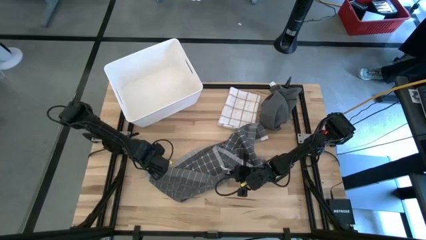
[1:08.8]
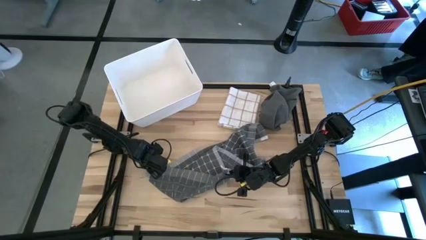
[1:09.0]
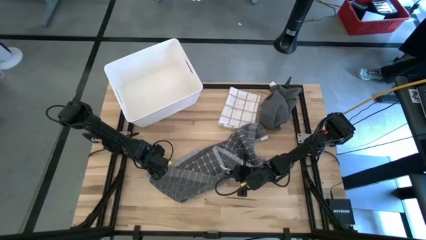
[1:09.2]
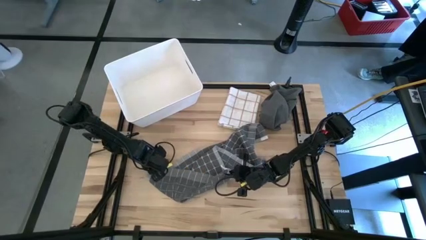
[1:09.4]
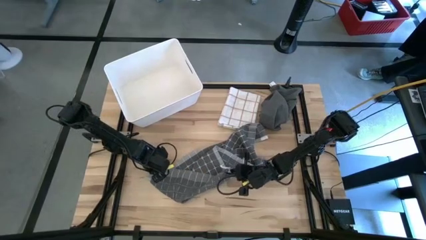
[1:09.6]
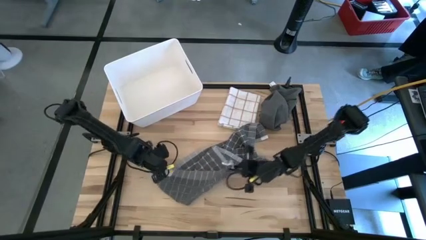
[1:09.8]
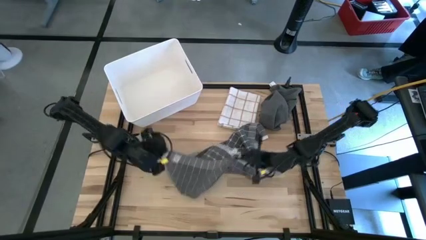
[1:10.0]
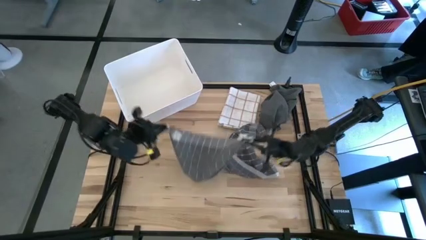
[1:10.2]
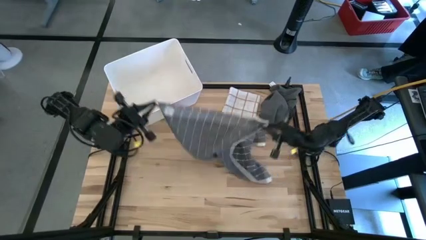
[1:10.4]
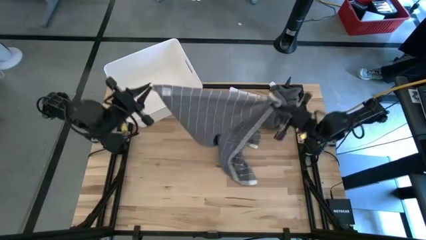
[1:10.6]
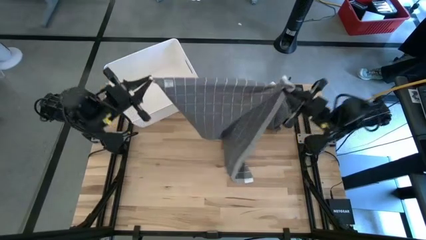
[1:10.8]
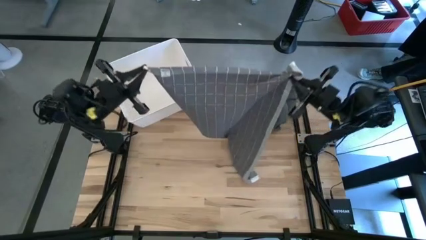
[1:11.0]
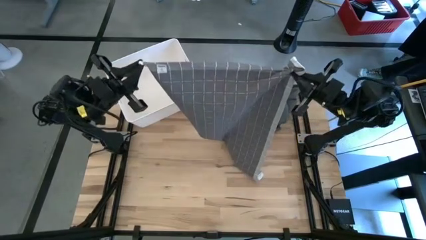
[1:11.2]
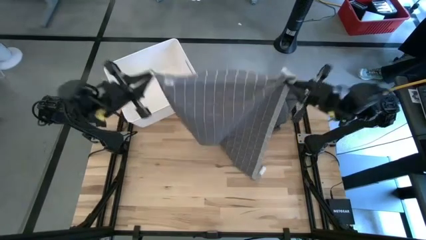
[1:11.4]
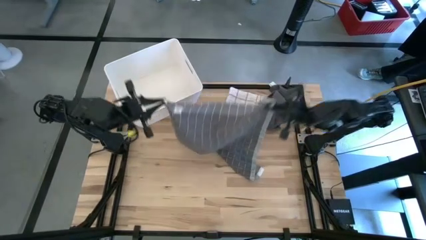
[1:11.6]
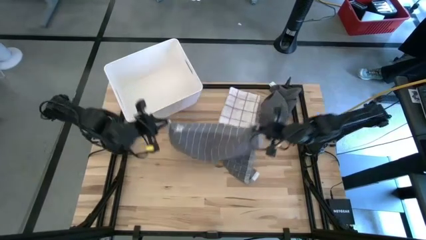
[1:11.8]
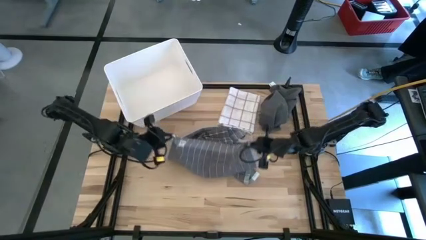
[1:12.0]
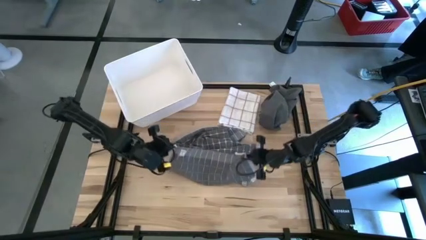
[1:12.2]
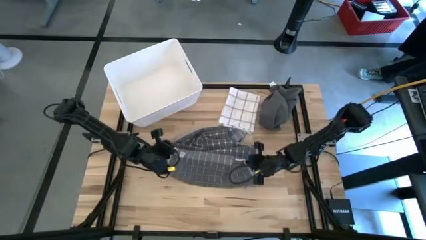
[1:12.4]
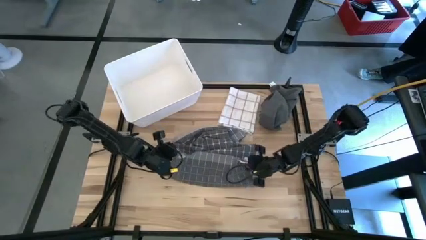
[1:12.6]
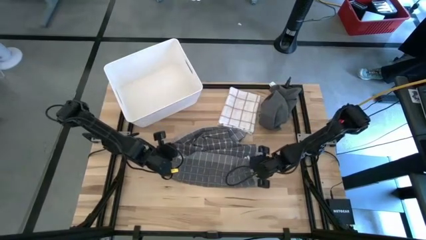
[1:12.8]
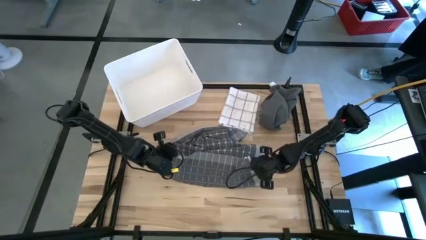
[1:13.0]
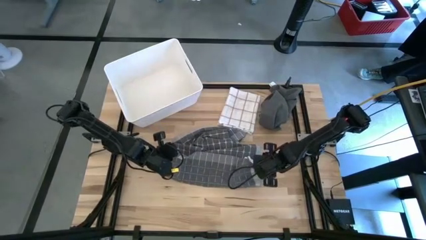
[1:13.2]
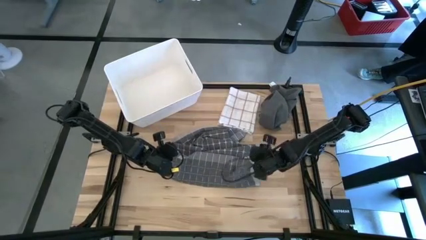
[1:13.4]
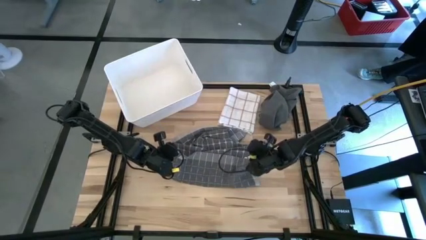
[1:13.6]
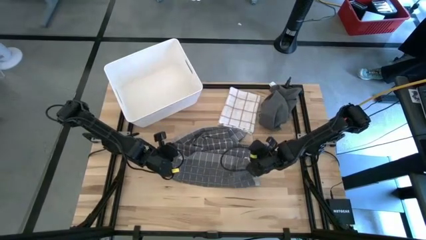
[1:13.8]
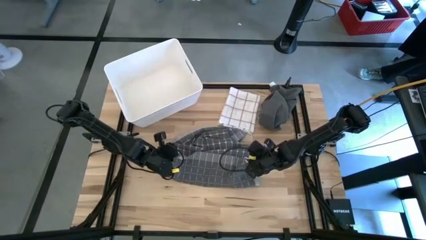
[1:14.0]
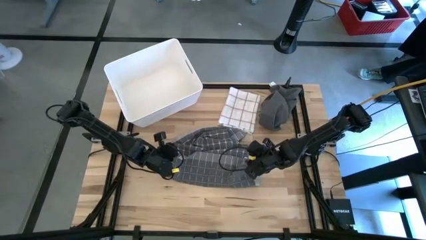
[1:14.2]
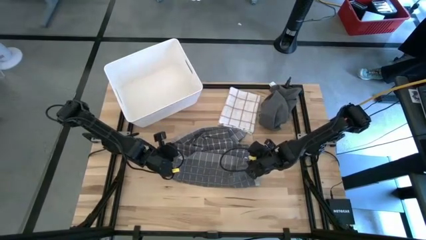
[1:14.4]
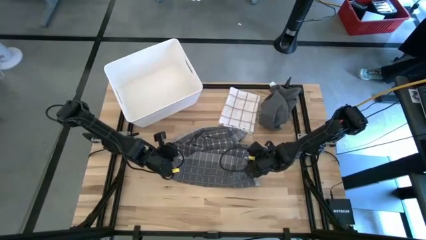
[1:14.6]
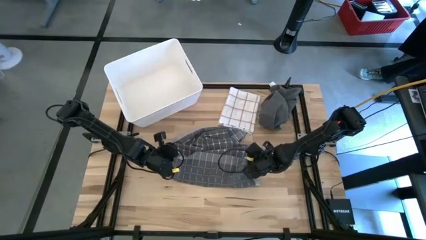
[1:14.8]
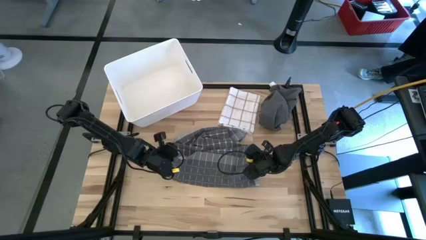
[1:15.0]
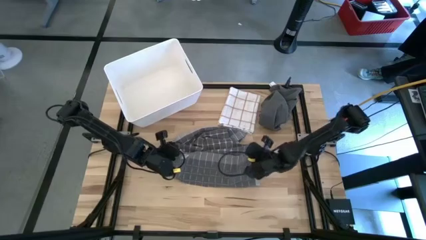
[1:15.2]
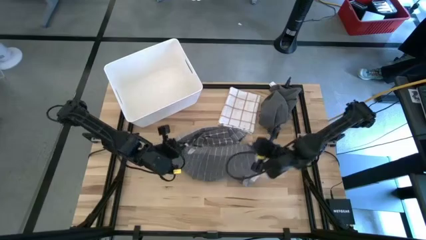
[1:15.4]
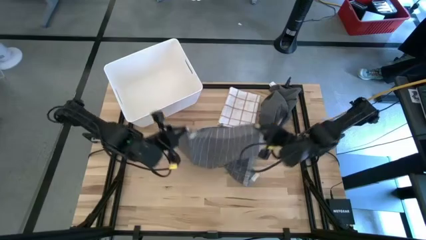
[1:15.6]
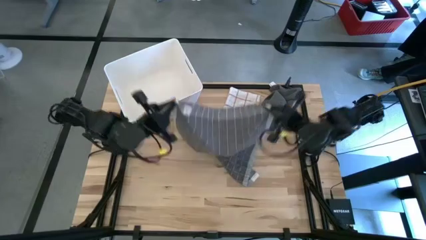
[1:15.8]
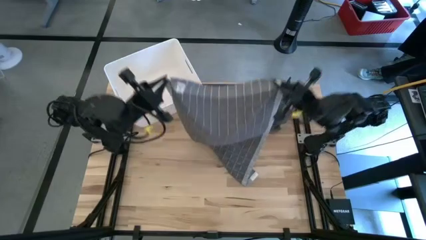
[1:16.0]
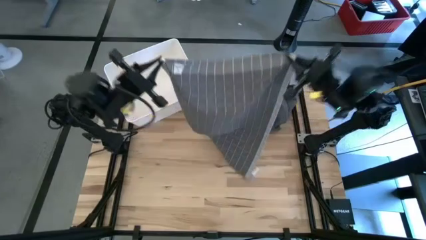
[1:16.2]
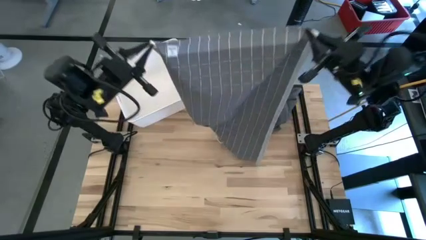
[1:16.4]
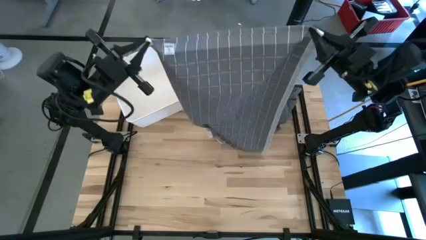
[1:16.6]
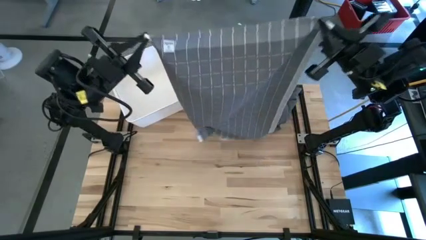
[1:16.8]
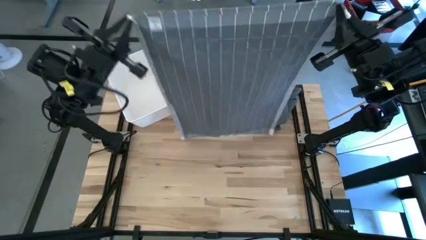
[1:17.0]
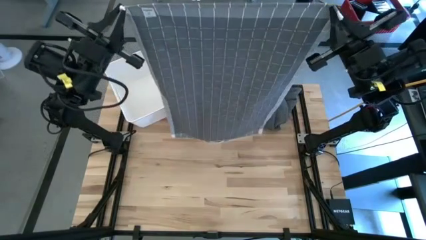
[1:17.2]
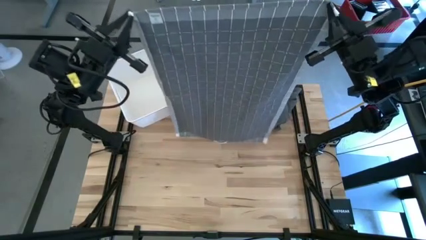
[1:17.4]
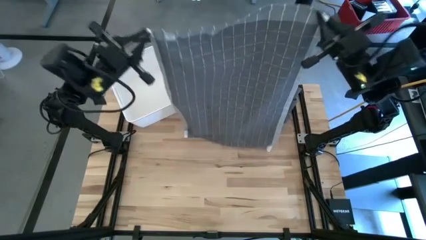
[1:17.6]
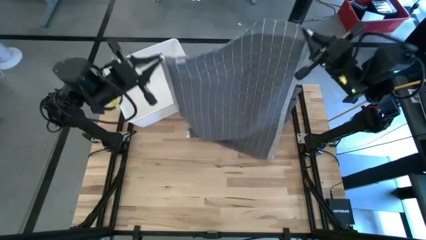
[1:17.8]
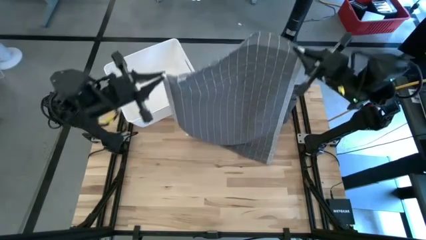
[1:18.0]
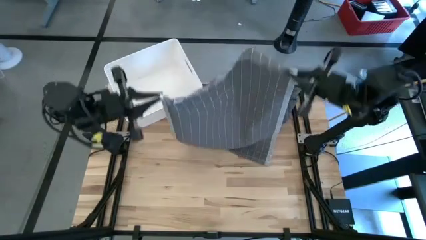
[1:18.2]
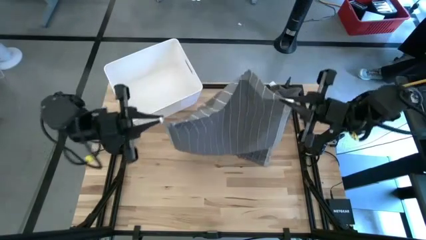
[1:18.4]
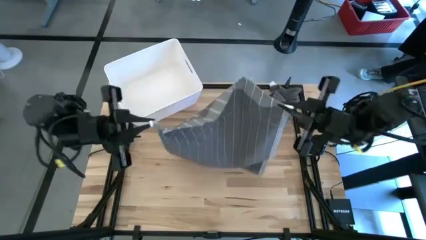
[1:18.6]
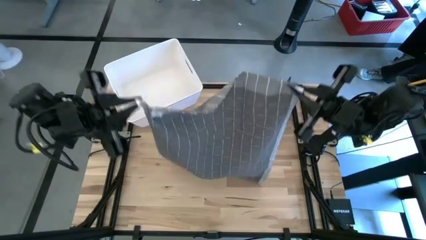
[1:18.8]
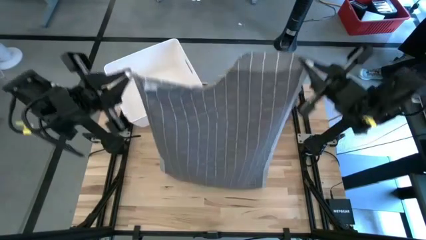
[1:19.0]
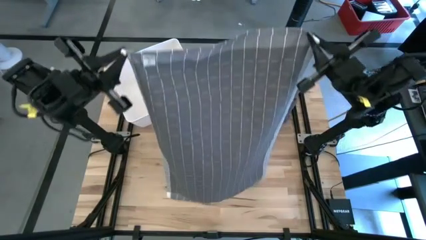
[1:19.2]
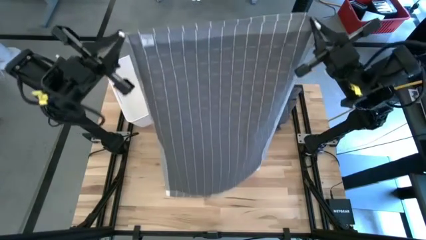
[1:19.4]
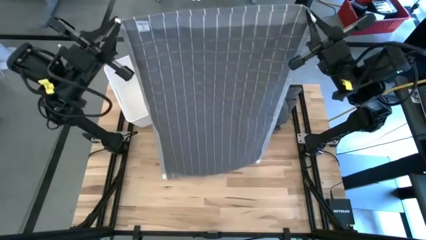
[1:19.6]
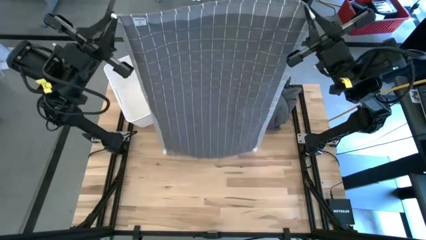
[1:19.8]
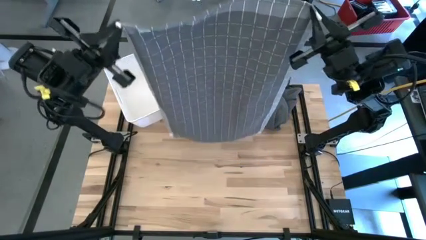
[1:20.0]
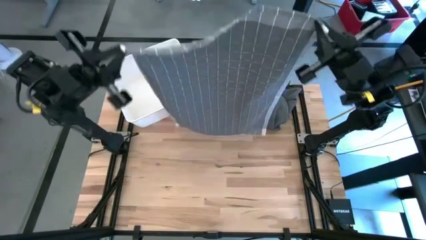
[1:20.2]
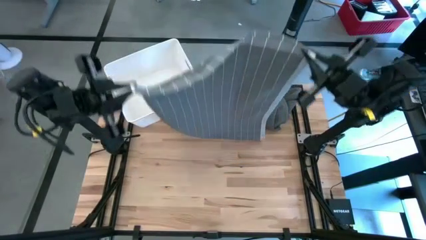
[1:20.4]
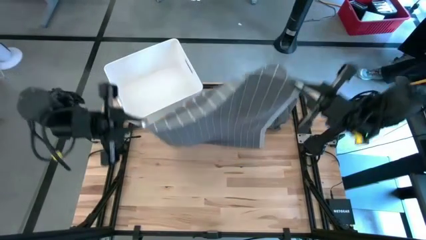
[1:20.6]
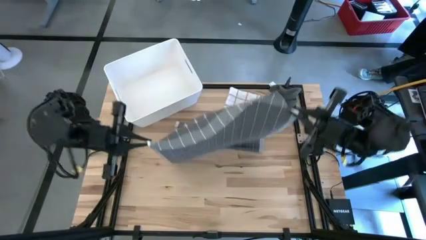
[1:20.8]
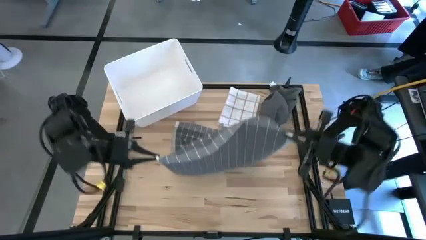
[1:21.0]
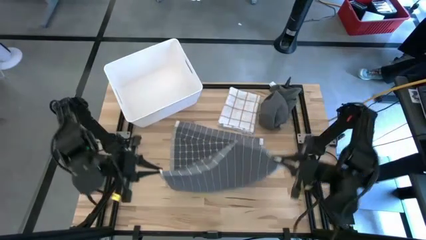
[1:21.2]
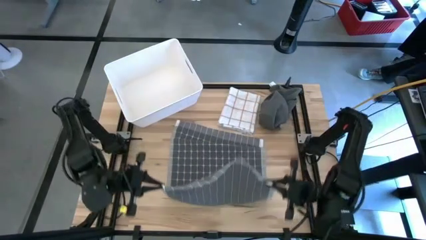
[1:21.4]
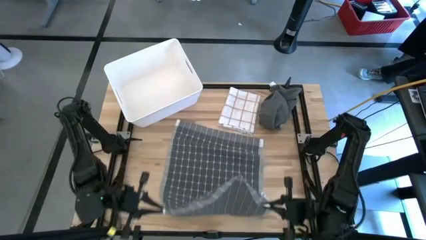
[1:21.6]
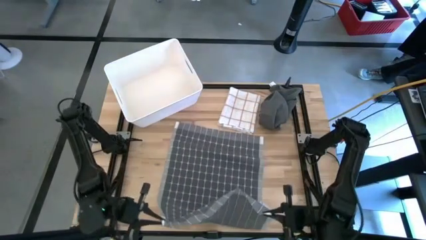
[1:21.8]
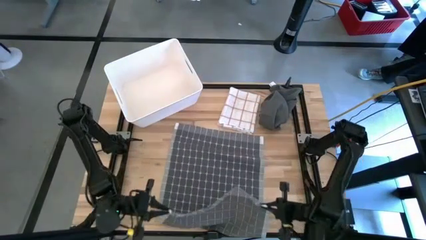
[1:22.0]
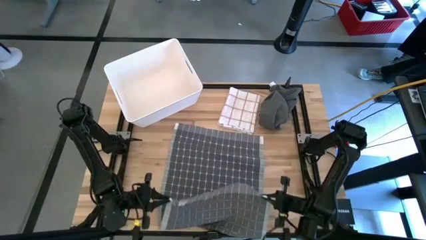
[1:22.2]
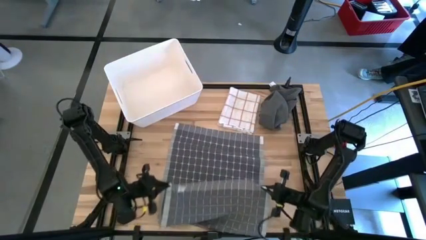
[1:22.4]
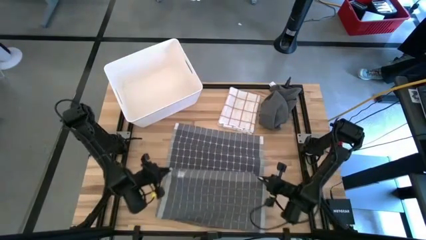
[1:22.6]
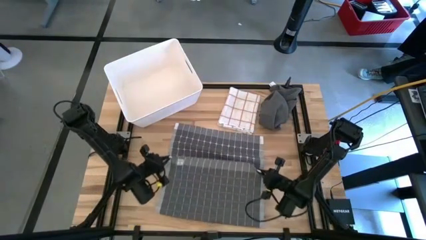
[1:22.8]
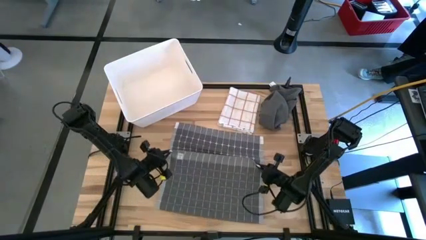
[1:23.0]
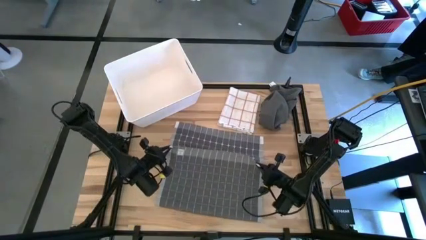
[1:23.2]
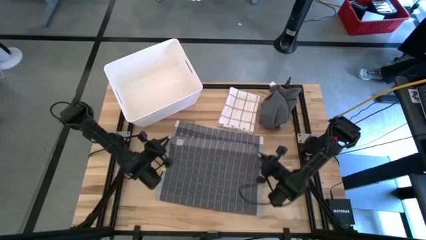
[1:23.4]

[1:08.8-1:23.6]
Task: Fold towel
Fold the gray checkered towel

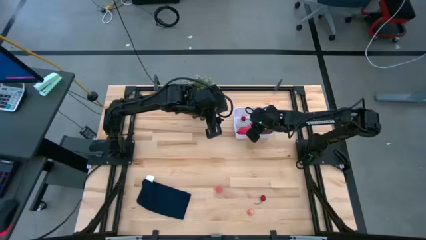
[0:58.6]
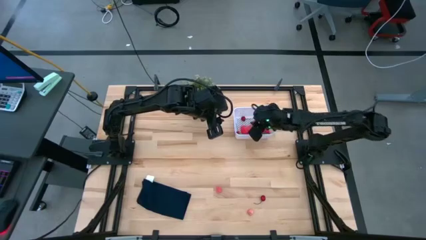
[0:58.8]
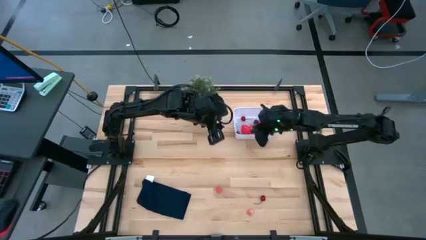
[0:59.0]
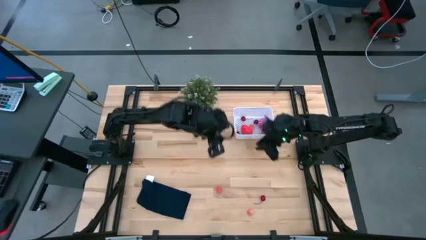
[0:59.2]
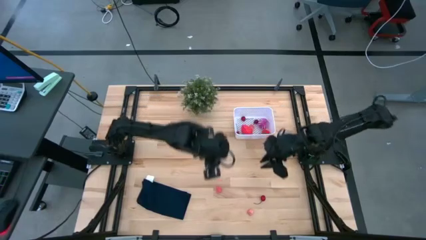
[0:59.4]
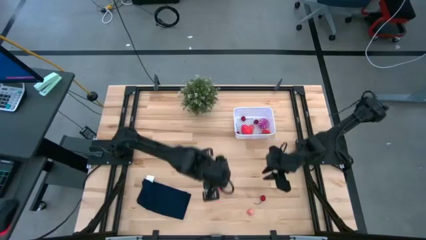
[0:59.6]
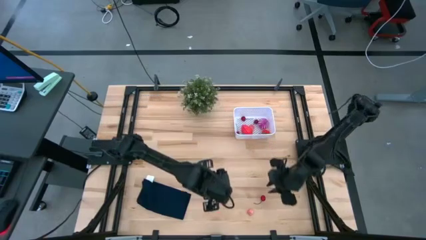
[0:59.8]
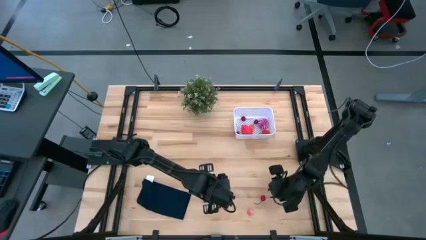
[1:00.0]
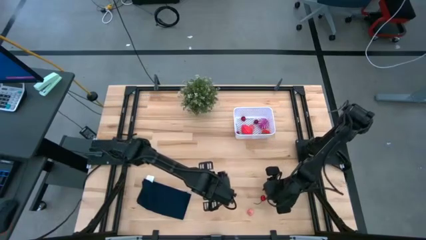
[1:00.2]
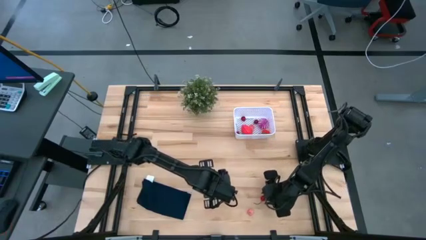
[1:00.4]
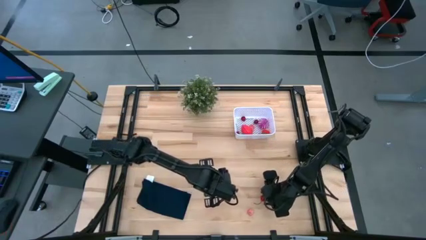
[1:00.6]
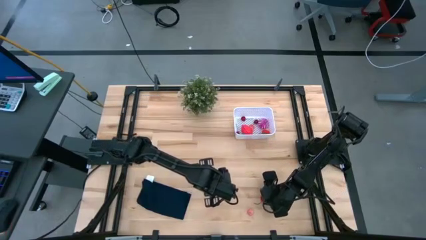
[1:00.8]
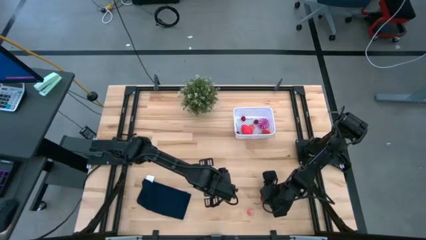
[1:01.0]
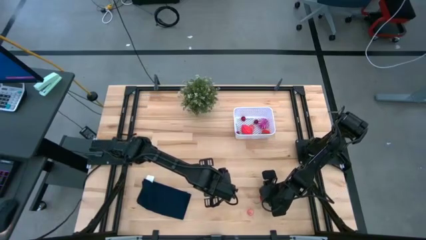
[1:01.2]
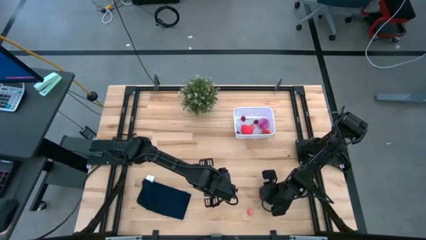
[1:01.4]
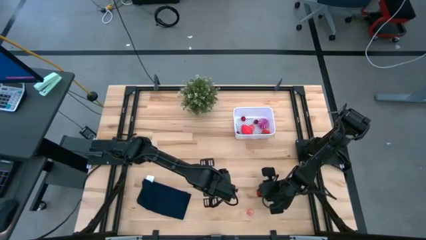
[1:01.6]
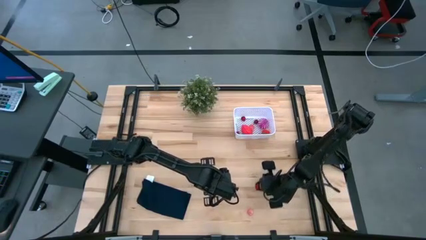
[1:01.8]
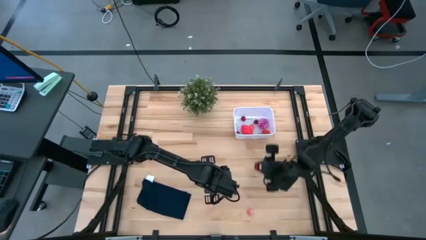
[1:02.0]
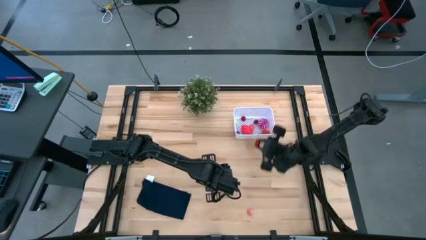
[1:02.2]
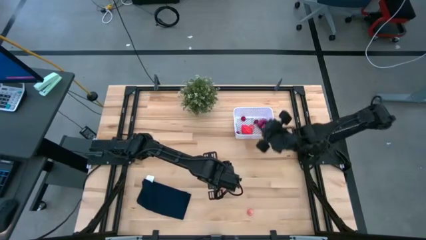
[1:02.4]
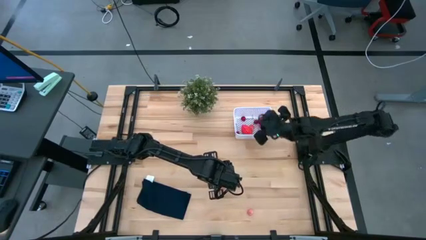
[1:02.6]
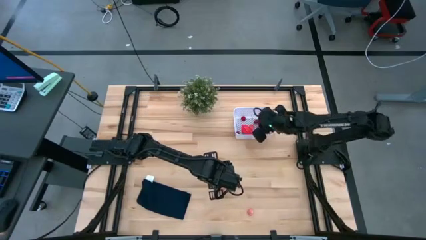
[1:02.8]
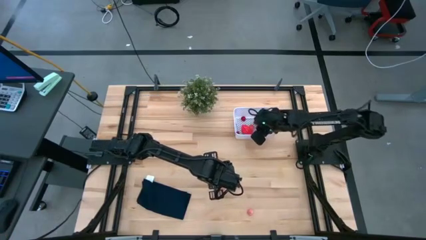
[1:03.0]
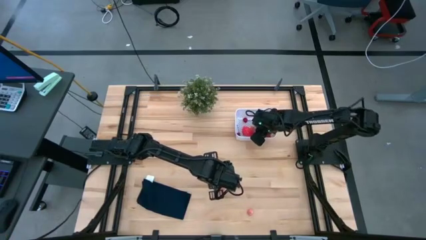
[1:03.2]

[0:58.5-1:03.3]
Task: Pick and placing Produce into tupperware
Put the cherry into the bin
